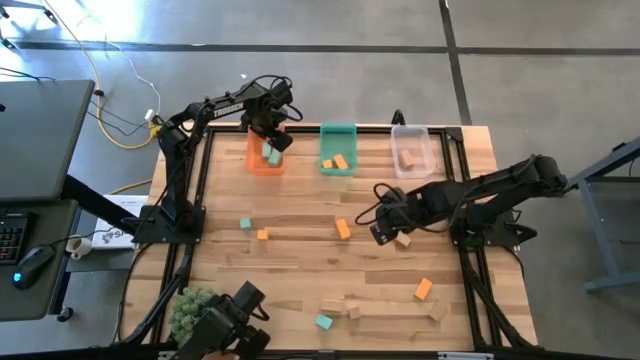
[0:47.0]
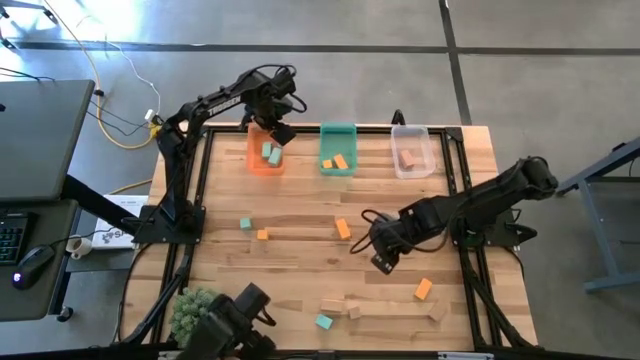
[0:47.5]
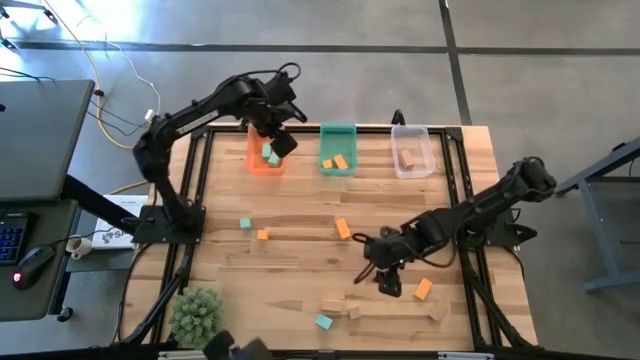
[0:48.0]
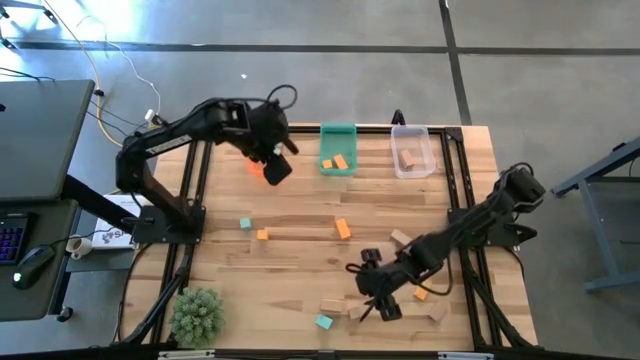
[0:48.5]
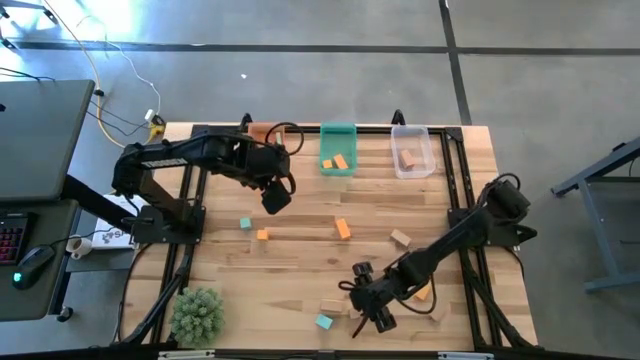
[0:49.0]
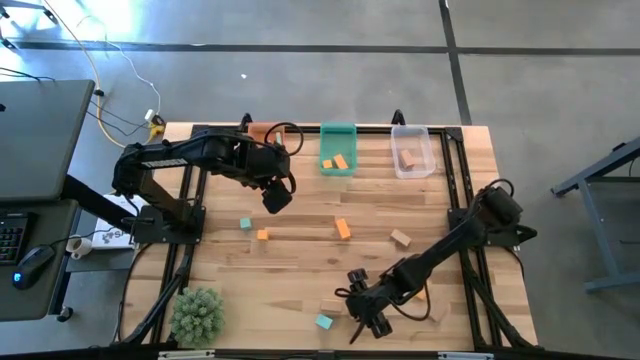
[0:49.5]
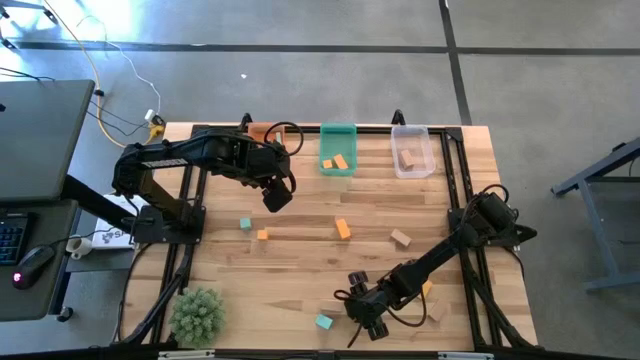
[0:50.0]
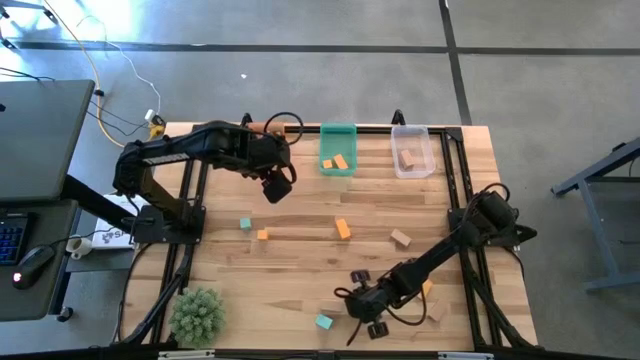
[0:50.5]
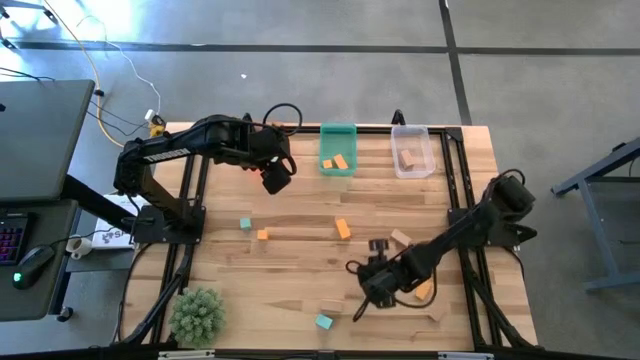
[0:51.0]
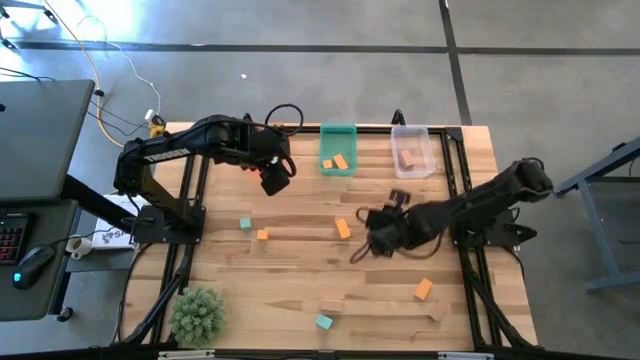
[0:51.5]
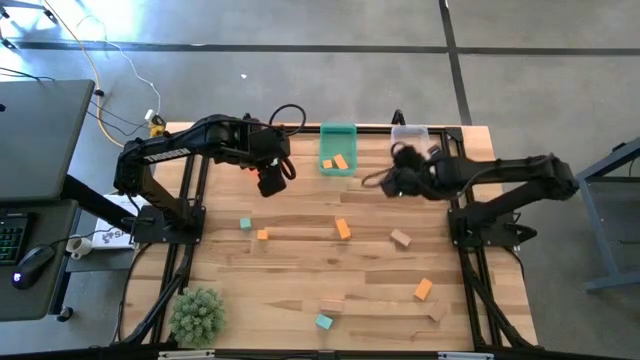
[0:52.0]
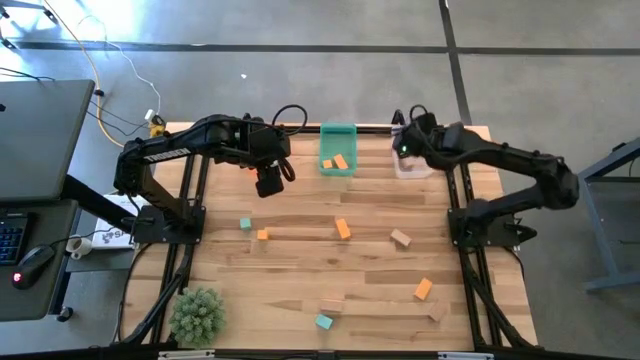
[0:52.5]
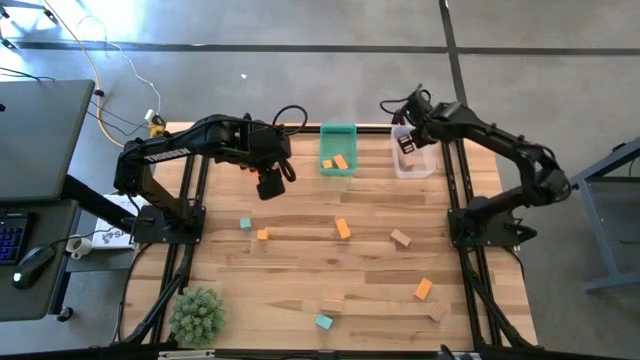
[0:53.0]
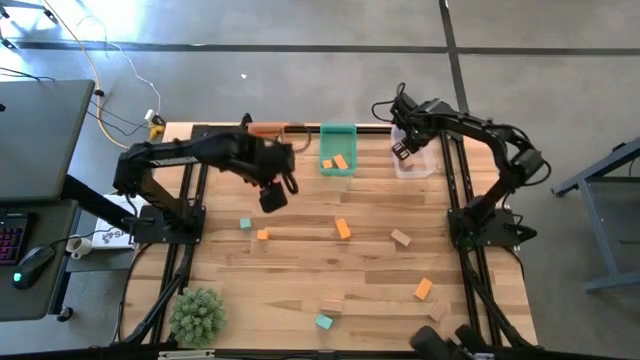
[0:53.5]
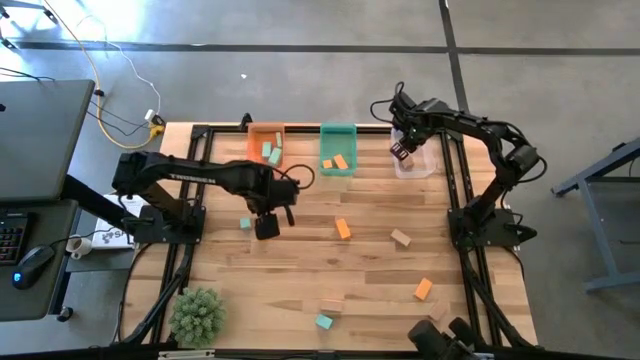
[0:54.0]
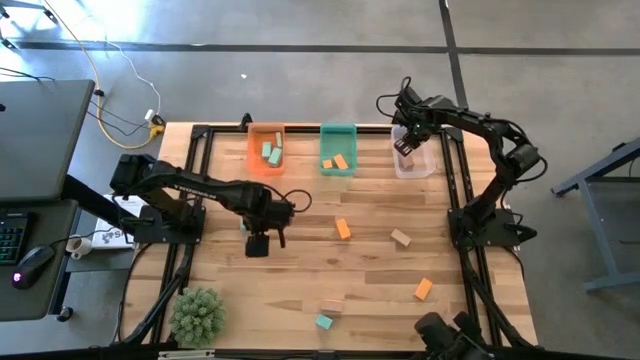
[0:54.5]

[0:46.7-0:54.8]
Task: Sort & place blocks by color
Put the brown block into the transparent bin

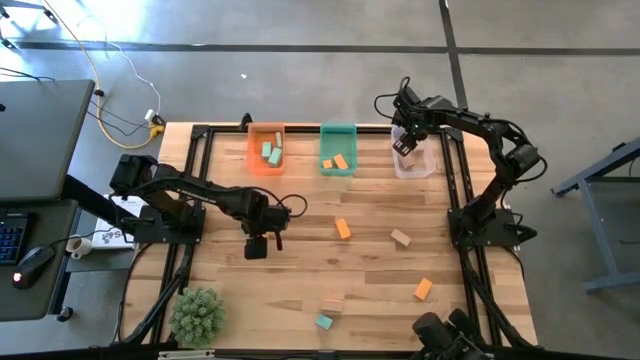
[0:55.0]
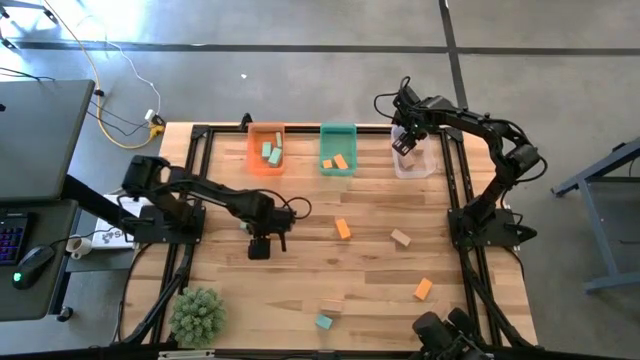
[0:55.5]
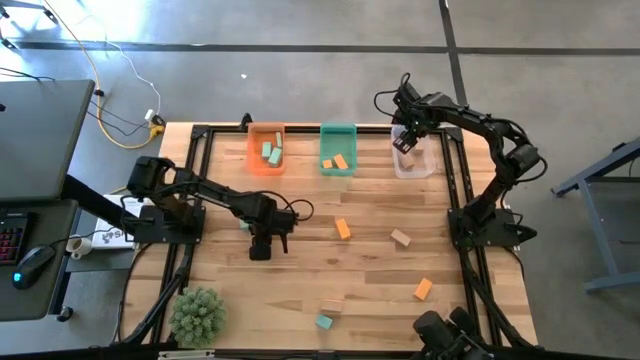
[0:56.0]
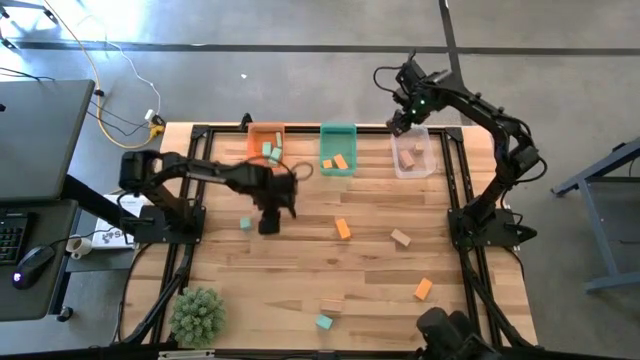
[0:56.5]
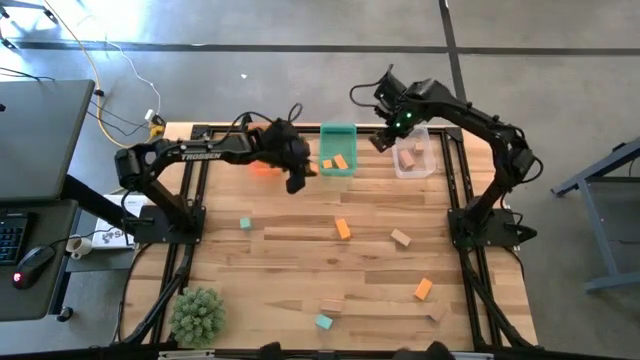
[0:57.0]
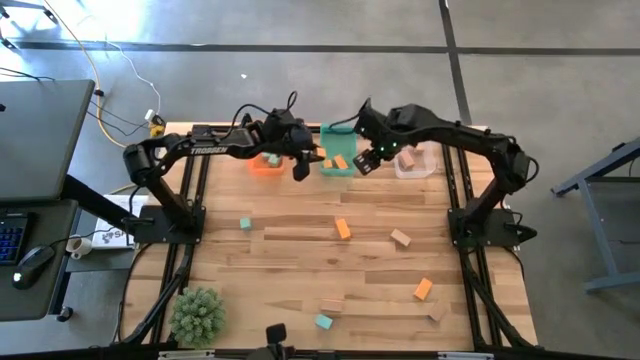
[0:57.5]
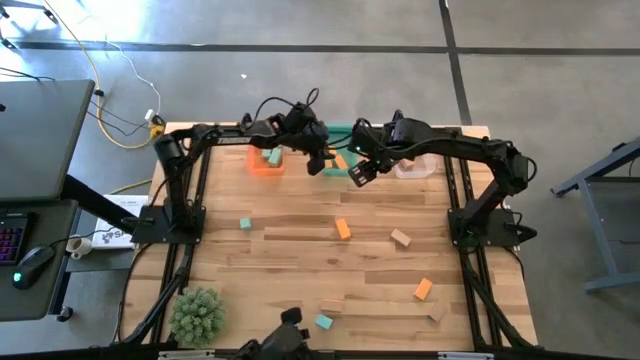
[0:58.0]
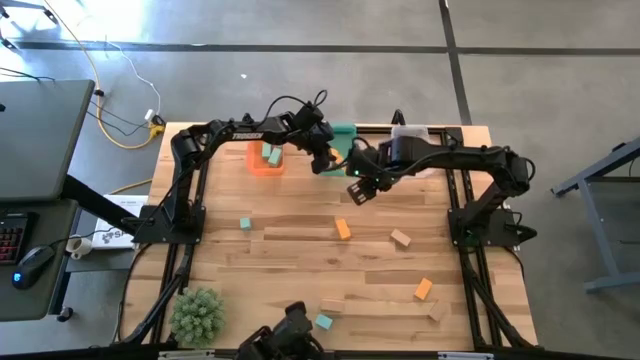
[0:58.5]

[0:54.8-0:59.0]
Put the yellow block into the blue bin

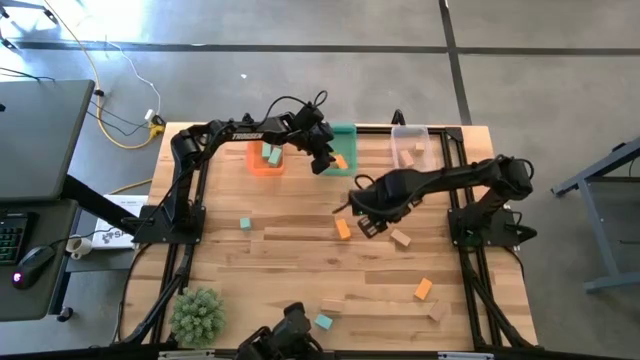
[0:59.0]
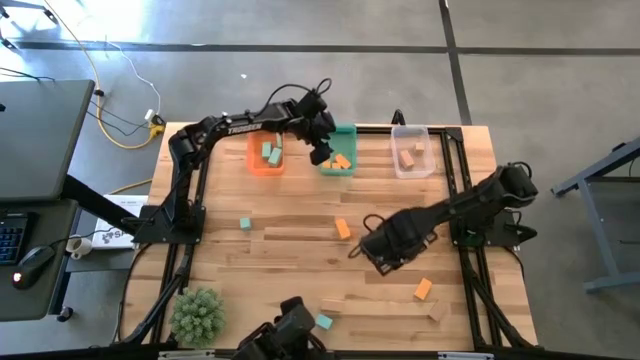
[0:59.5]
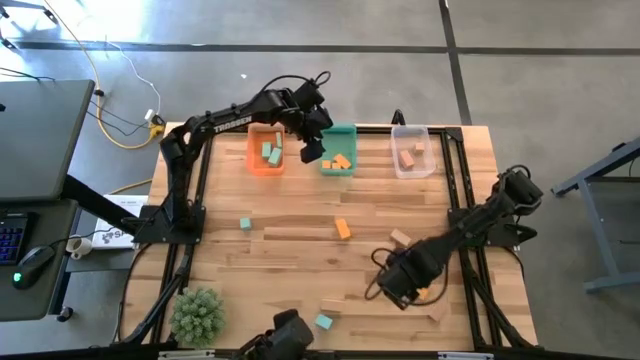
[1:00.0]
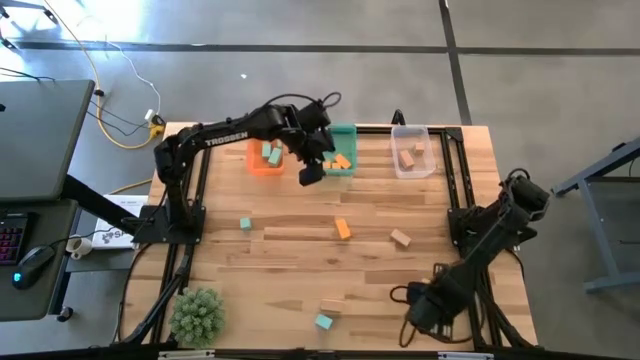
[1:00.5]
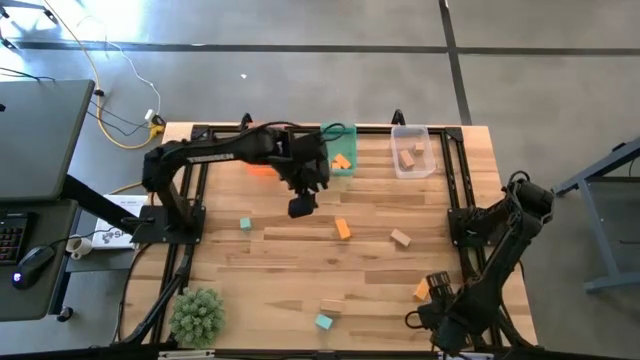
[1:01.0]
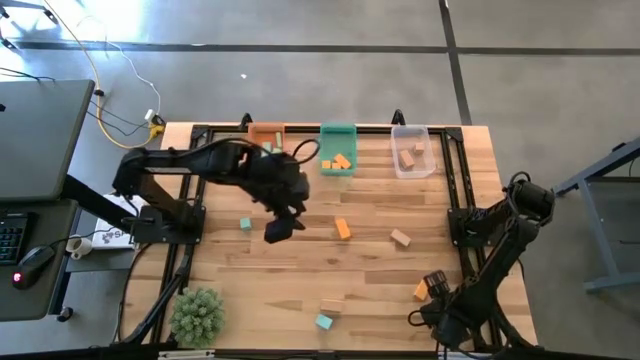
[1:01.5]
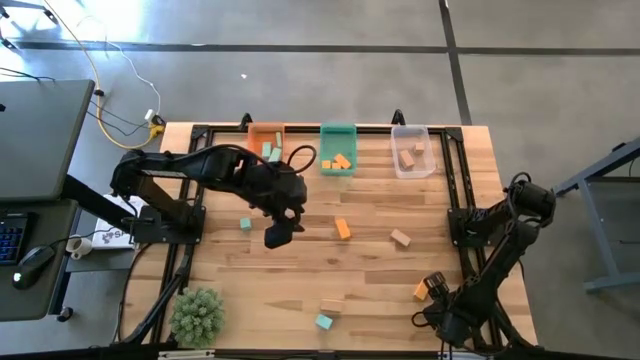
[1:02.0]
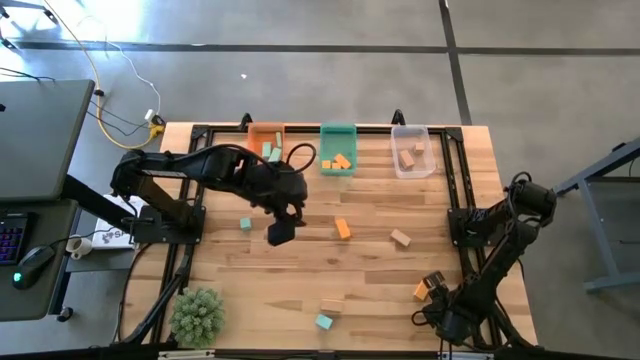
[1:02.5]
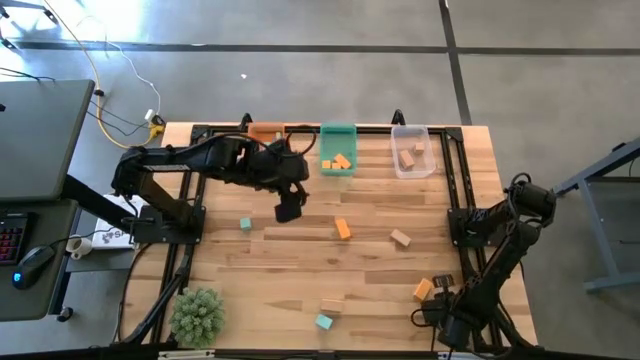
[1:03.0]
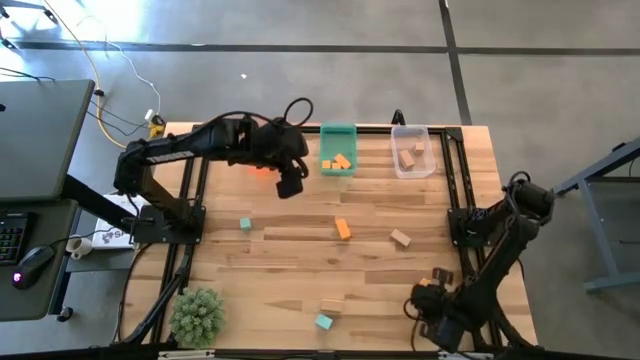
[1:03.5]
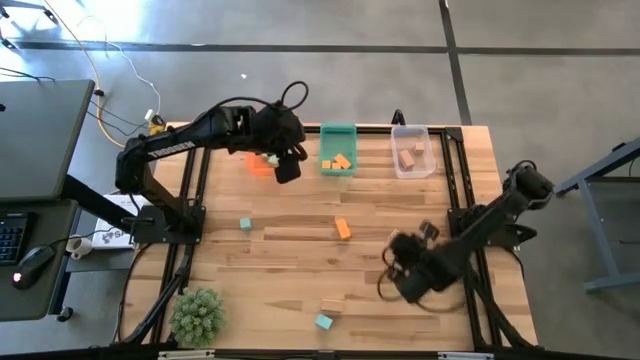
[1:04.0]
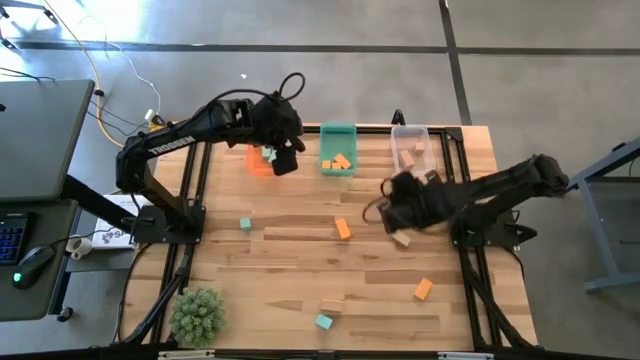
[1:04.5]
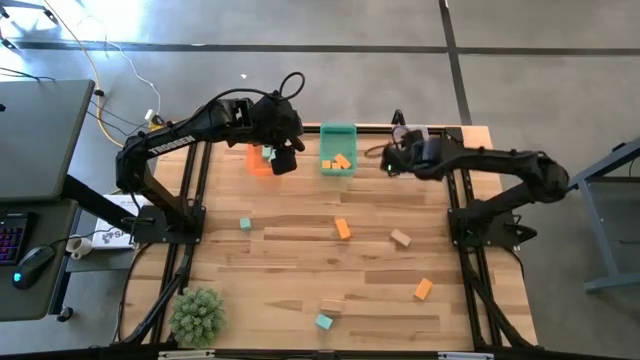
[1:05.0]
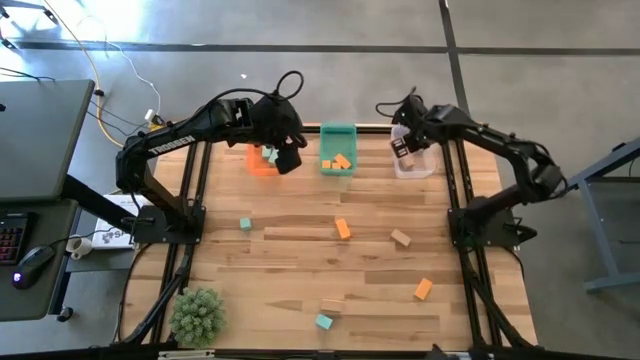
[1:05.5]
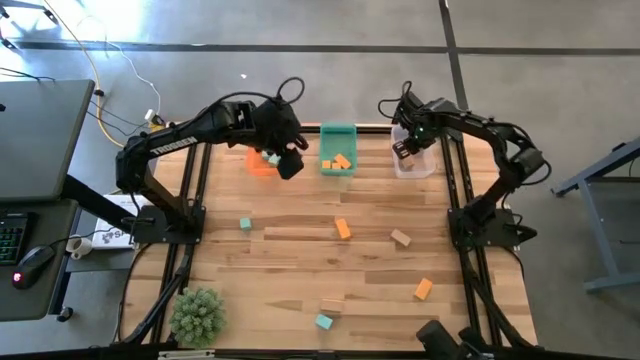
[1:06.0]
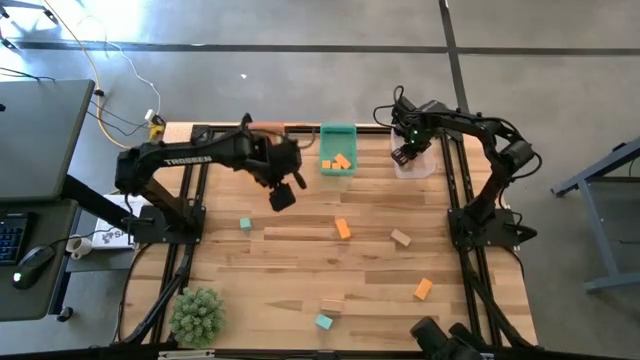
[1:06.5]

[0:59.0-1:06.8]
Put the brown block into the transparent bin

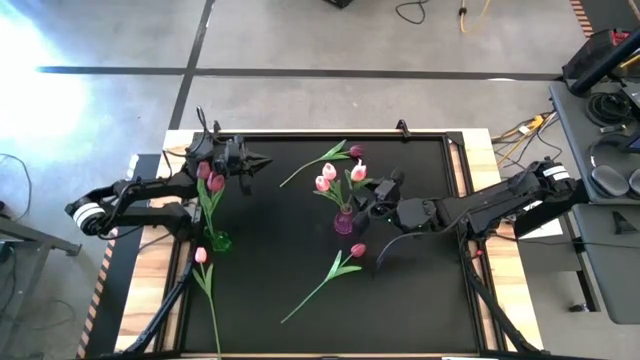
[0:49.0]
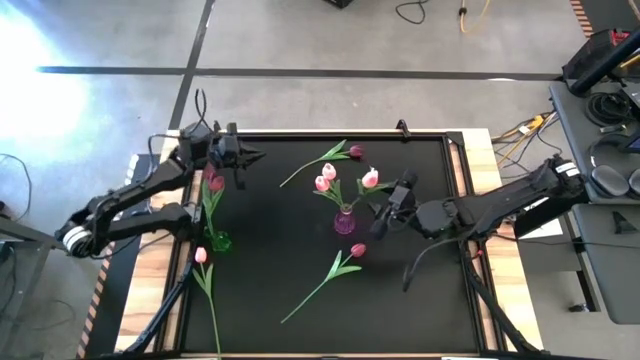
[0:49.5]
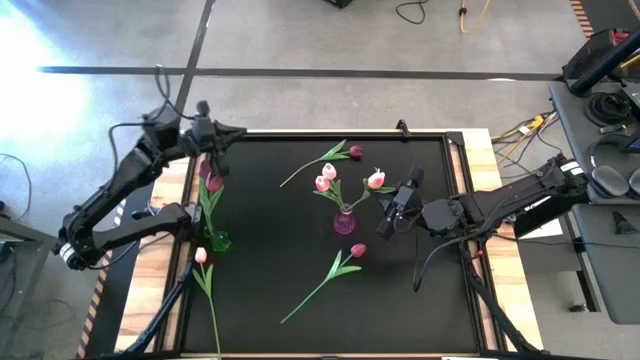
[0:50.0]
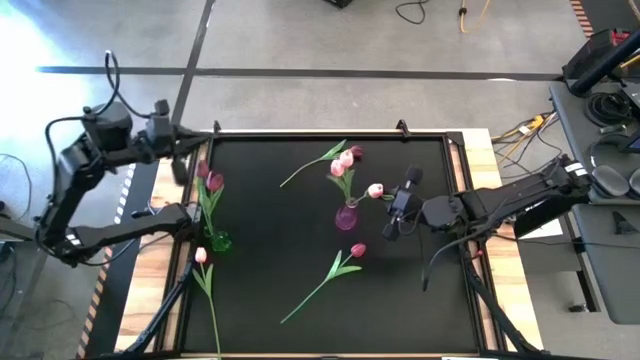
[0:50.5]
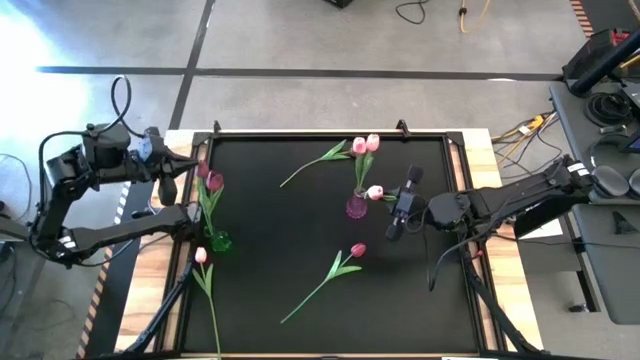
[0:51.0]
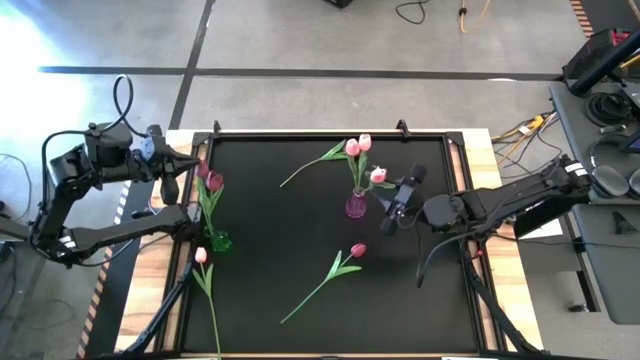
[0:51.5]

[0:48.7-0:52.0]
Task: Sort flowers into vase by color
Put the pink tulip into the purple vase
